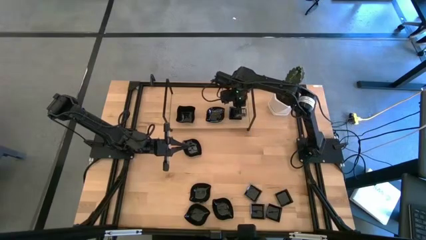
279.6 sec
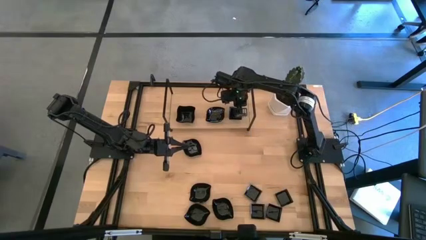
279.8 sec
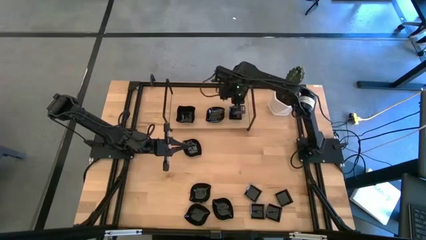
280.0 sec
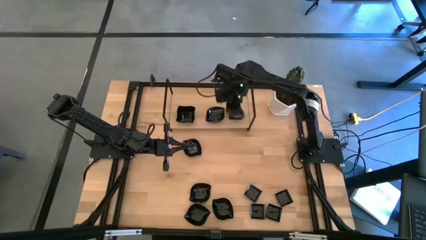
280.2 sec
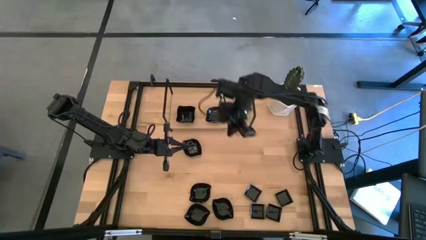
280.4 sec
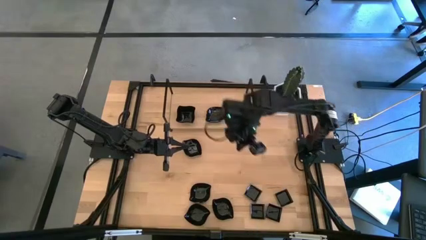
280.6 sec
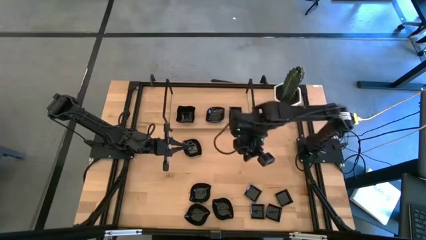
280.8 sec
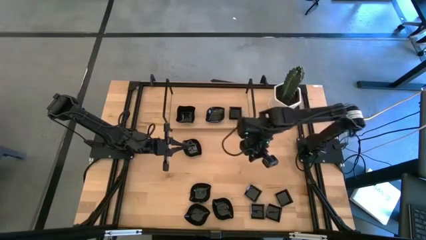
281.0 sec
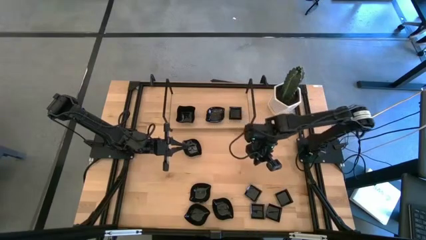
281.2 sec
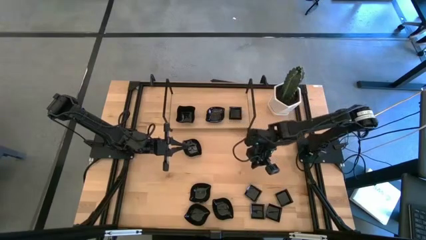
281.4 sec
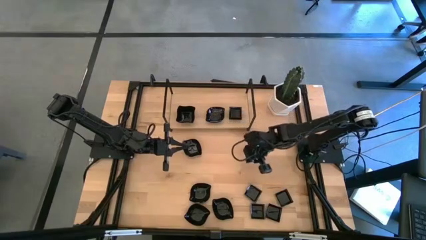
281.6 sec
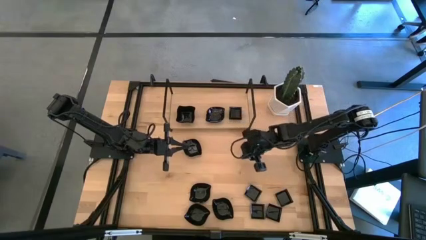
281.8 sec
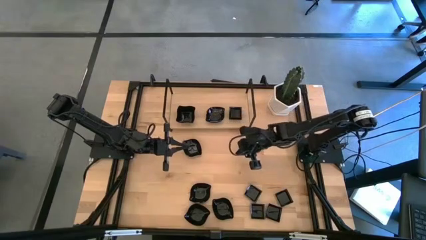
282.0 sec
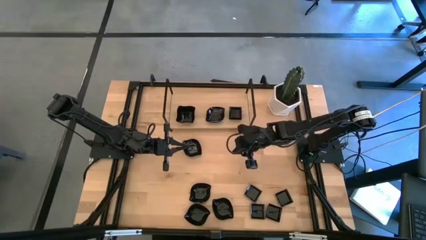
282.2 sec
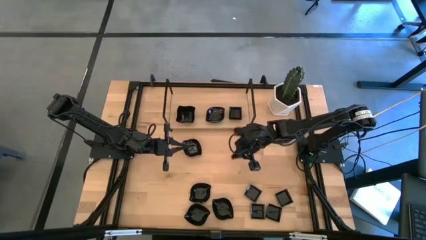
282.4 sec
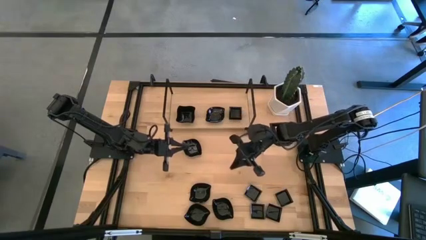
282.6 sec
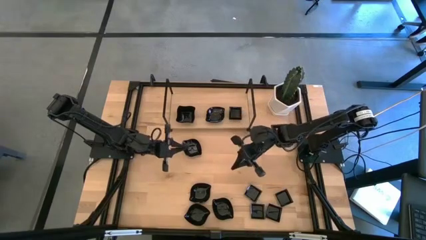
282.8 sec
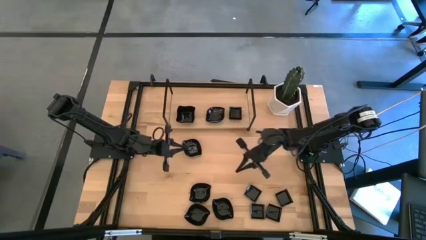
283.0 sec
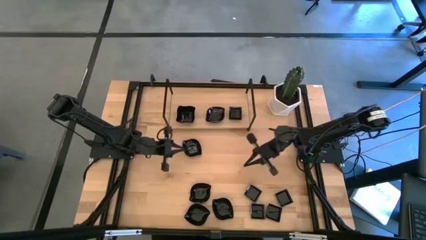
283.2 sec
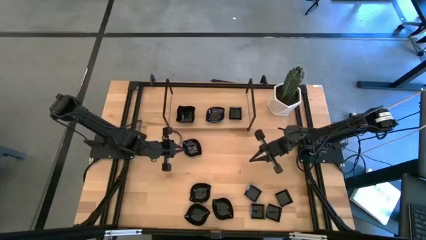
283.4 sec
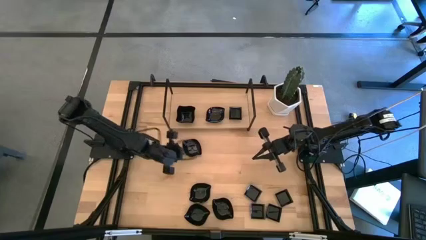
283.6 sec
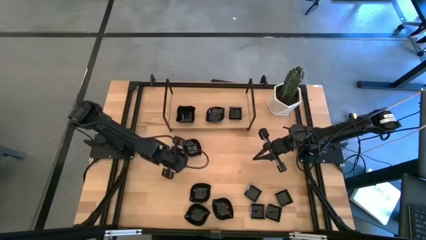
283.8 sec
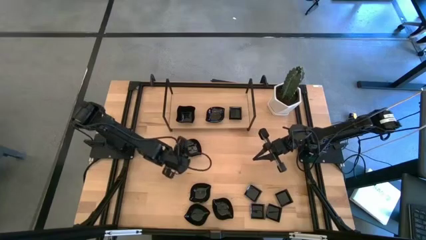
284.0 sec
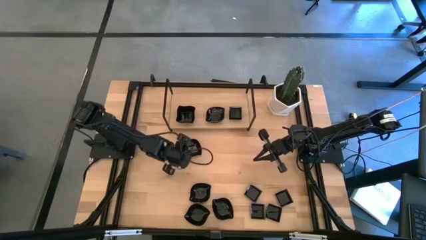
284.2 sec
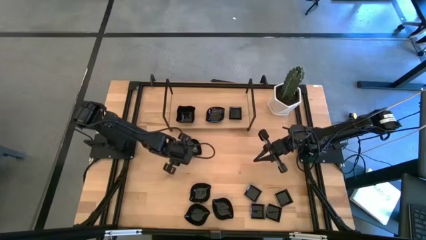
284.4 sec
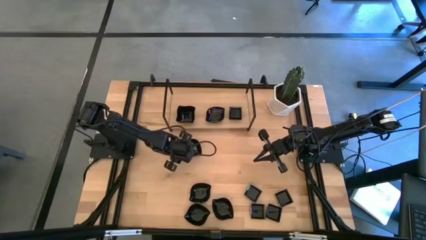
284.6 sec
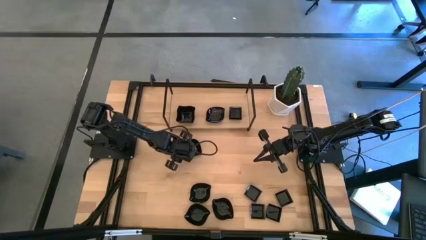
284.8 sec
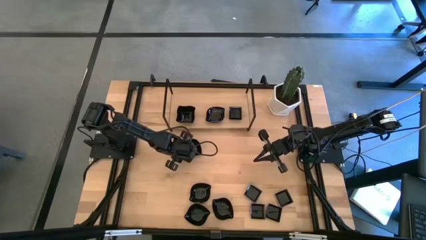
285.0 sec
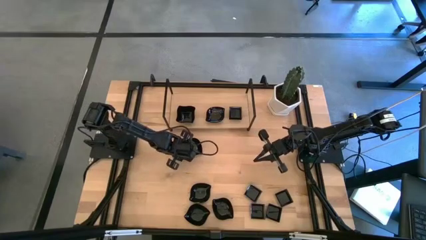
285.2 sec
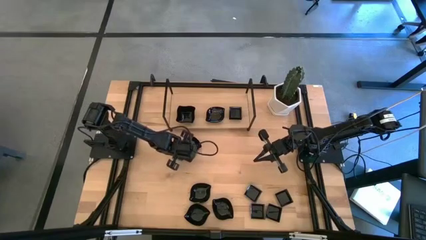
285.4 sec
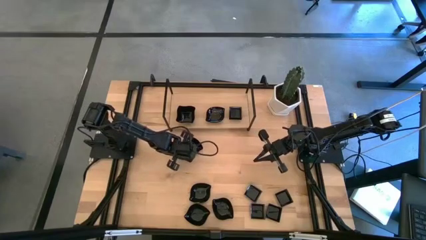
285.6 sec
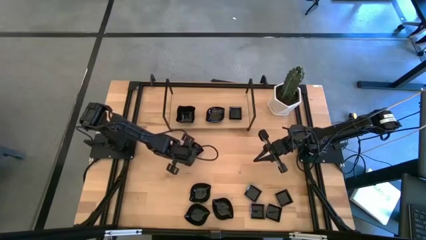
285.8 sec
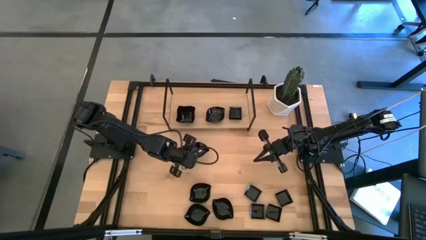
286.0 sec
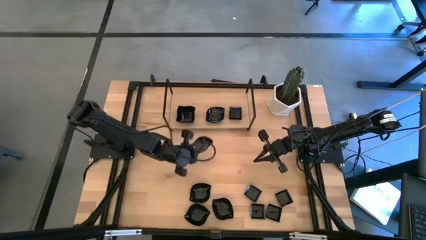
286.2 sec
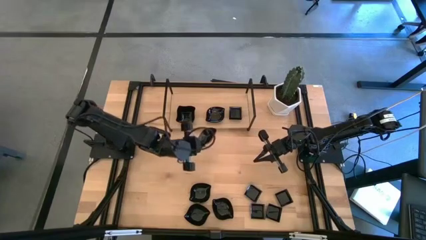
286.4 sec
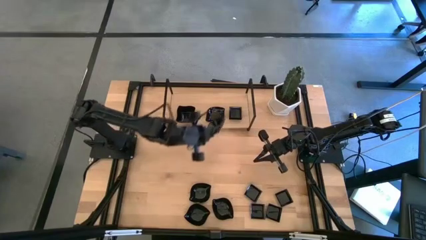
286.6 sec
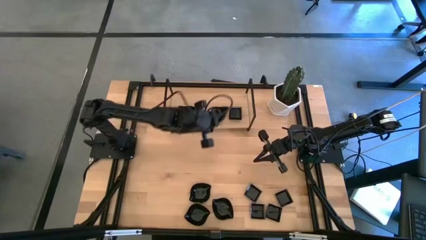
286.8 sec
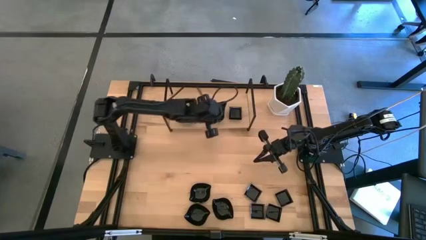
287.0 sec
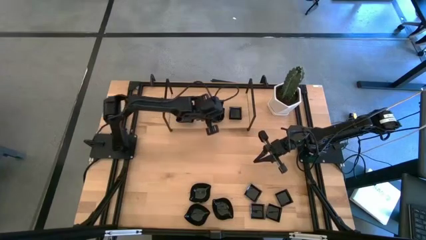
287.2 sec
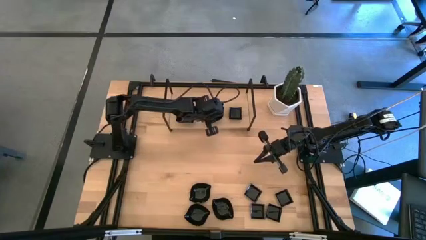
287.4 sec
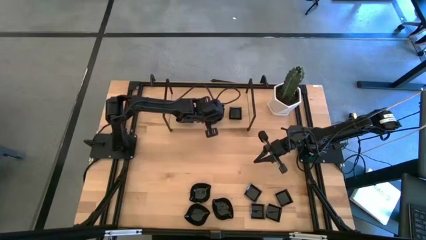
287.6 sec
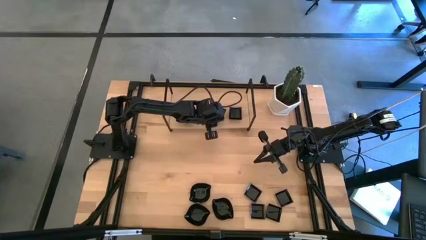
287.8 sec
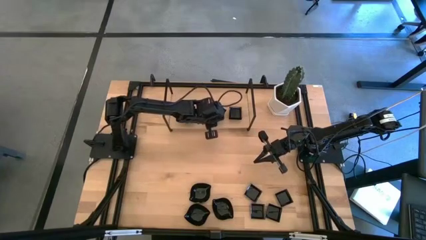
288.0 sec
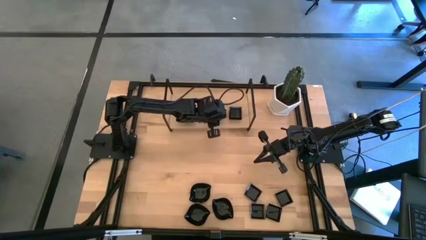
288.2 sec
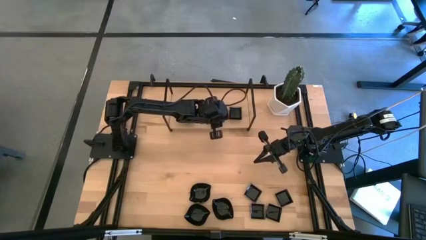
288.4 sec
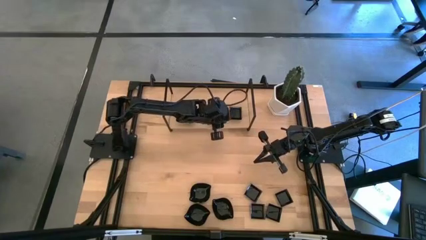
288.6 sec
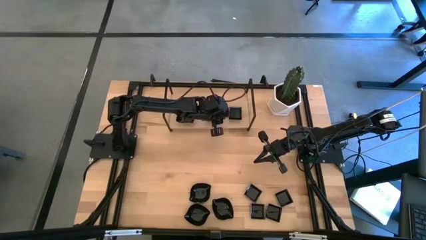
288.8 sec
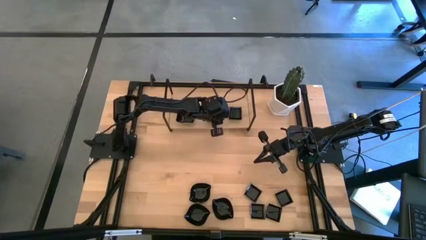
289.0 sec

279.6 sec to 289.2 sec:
Task: Pick & Place Mini shaped plates
Stack the leaf-shaped plate on the top of the leaf-shaped plate on the shelf

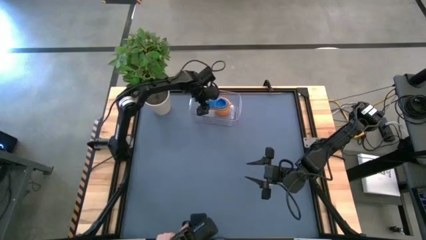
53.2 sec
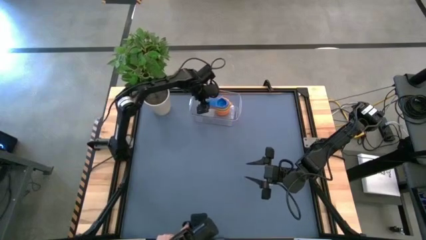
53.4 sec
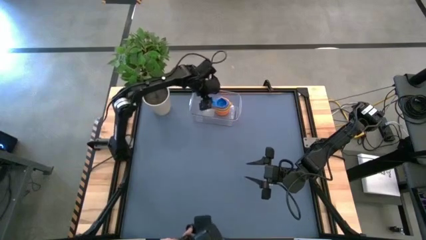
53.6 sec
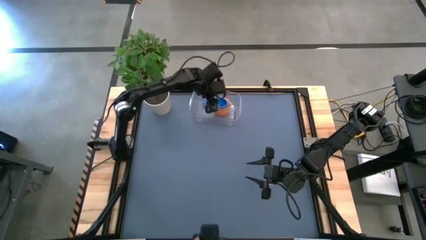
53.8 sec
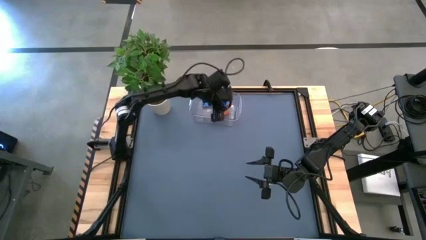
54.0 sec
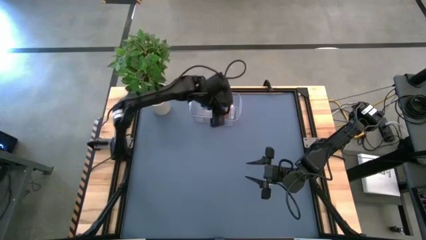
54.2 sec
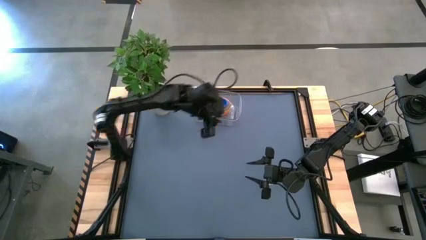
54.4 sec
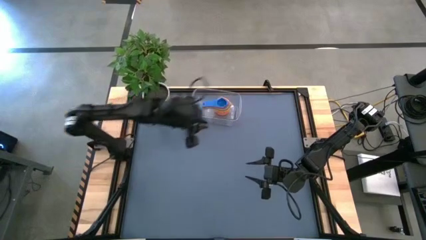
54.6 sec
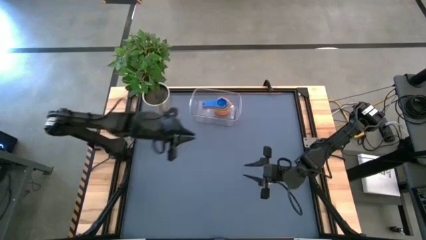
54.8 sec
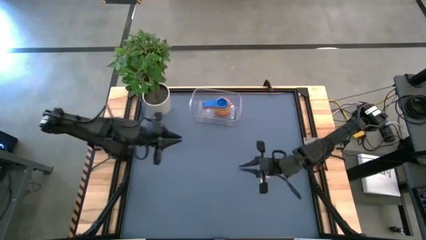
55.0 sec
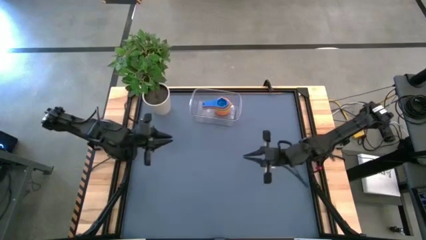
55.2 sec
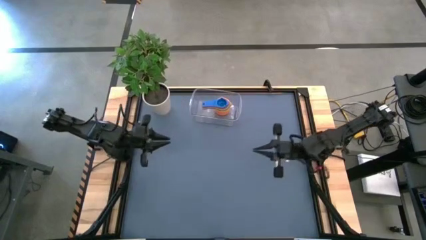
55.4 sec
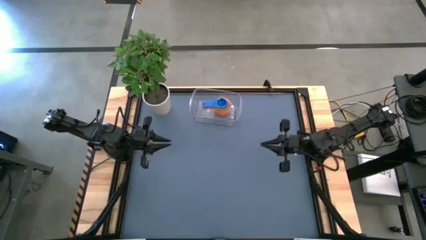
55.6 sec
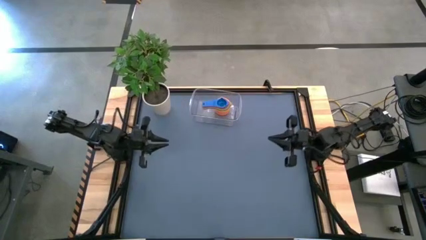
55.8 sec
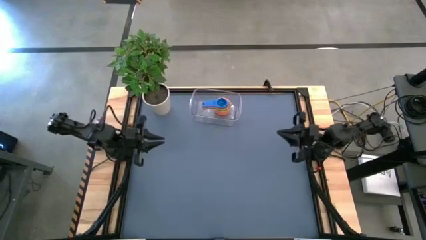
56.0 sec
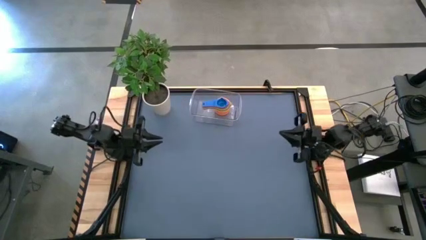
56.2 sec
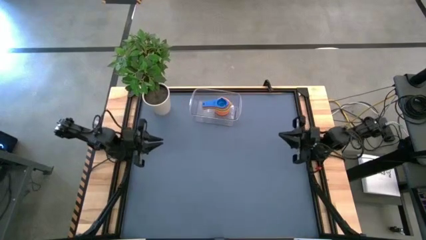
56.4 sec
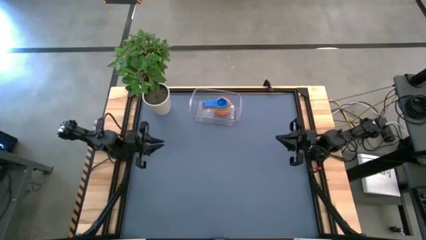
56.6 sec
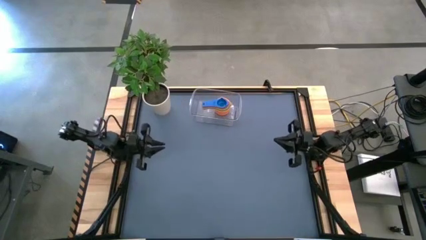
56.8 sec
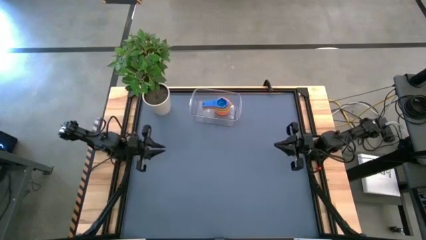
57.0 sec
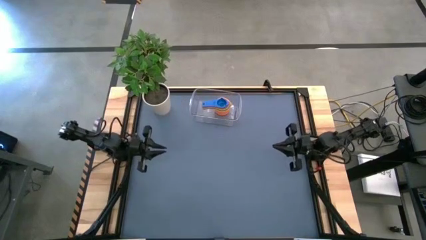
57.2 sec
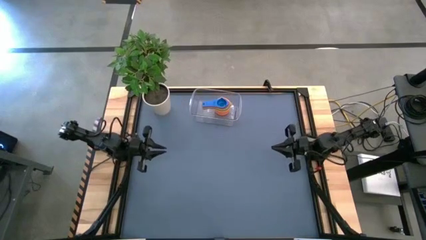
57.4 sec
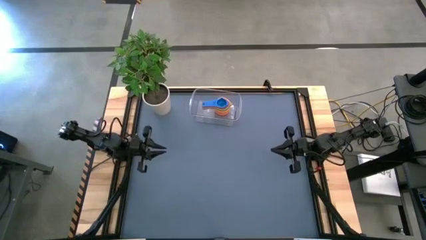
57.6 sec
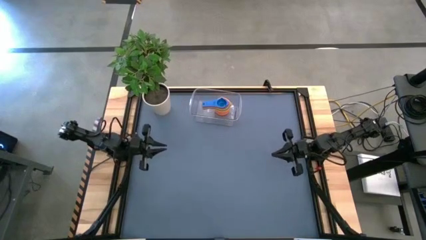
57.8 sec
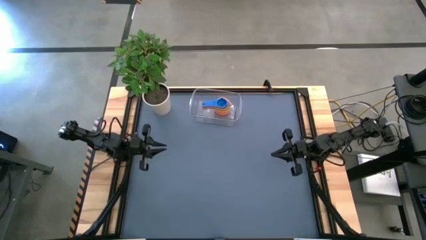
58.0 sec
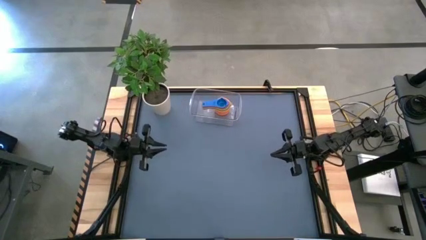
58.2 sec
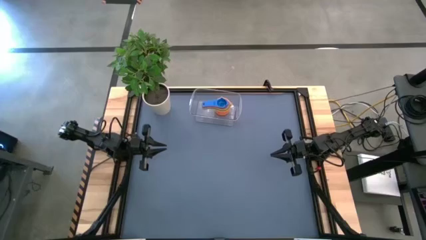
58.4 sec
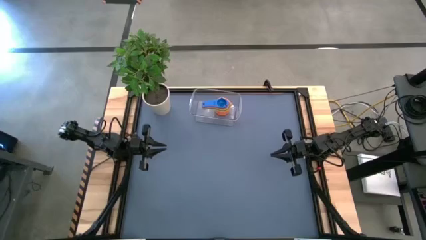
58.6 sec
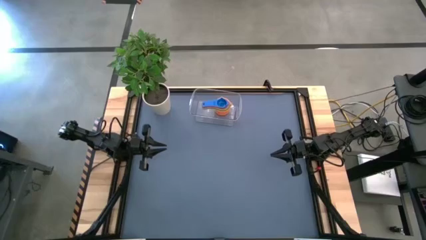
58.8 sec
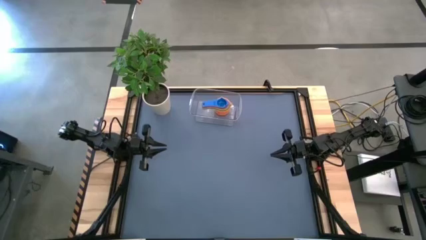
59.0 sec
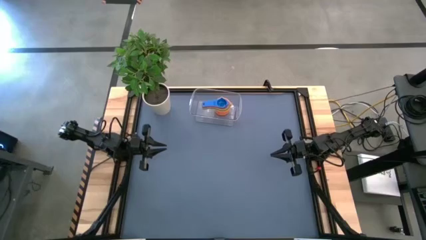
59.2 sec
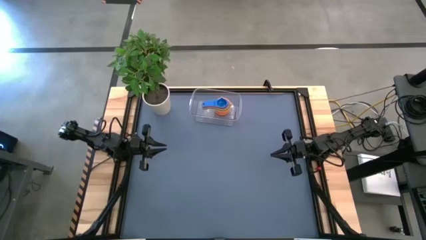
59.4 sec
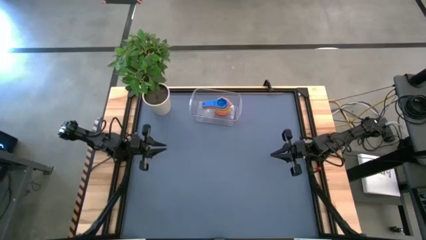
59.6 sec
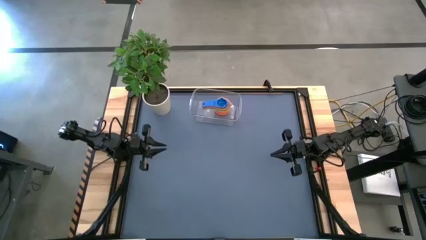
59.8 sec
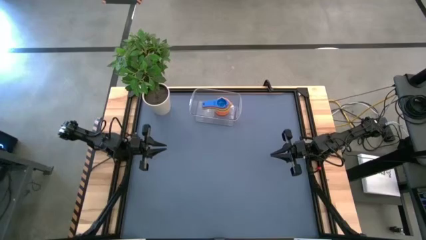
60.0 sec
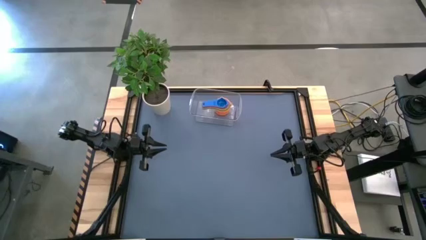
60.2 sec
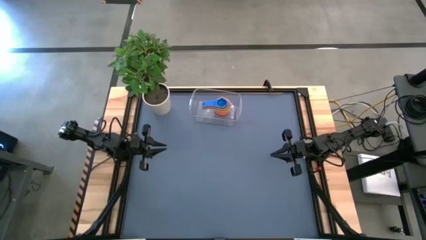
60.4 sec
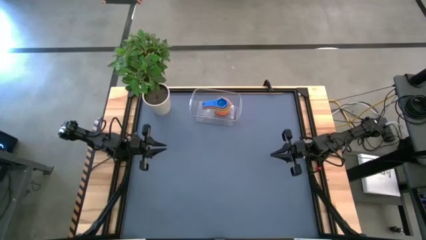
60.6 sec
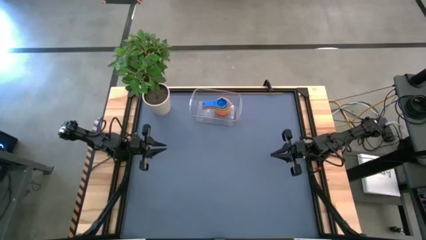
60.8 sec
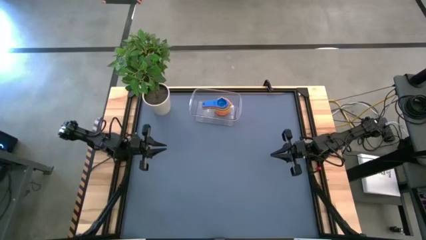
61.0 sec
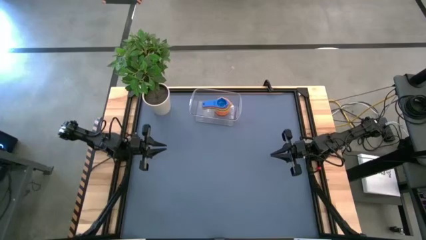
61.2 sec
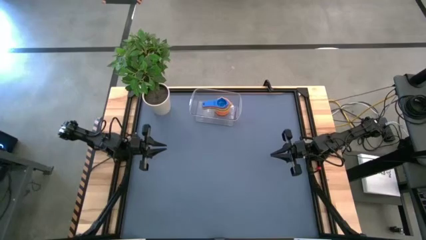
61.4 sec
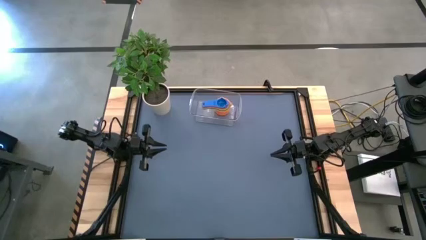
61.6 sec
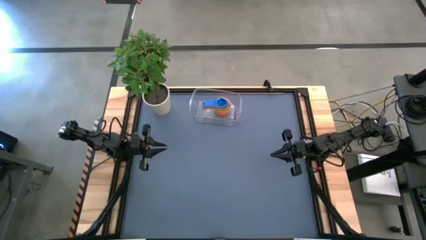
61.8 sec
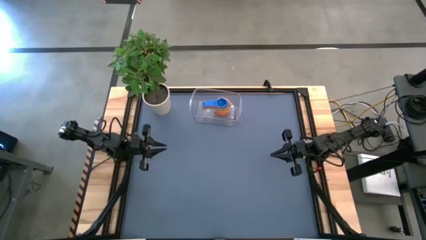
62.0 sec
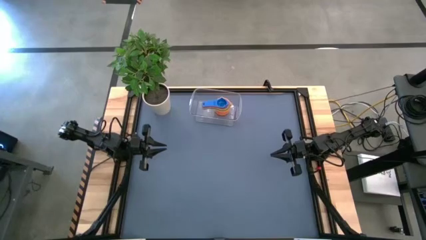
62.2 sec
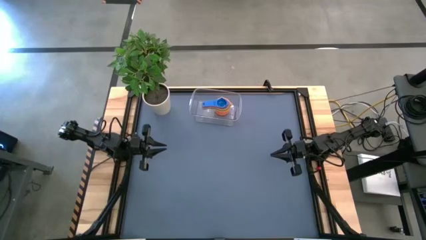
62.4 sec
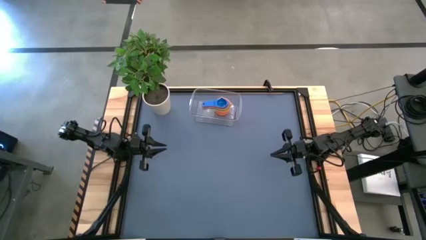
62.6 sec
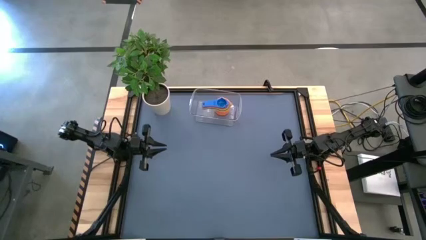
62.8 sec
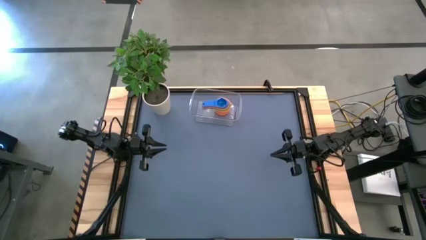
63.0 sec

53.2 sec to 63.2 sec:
Task: Nest measuring cups in basket
Return to home position
